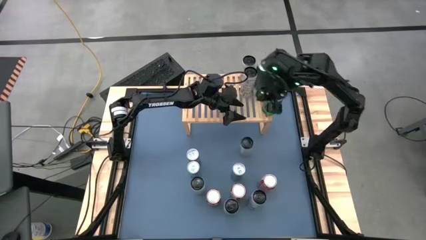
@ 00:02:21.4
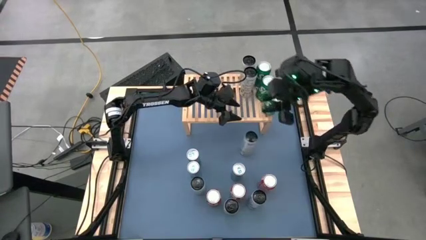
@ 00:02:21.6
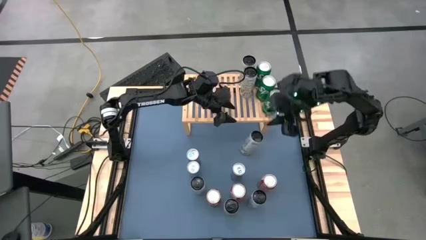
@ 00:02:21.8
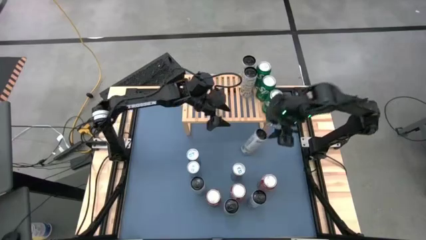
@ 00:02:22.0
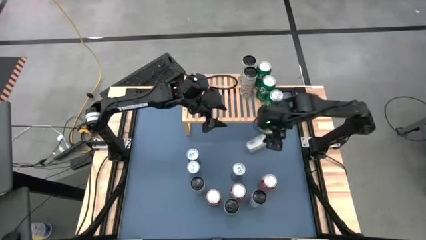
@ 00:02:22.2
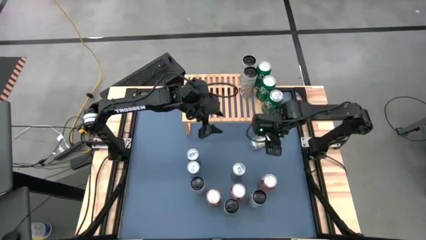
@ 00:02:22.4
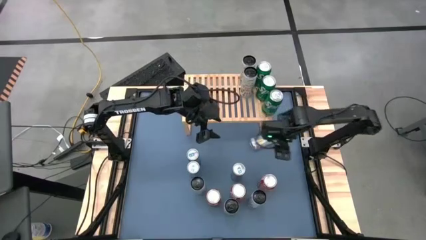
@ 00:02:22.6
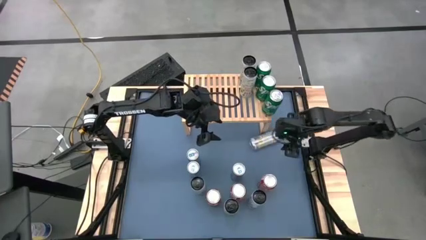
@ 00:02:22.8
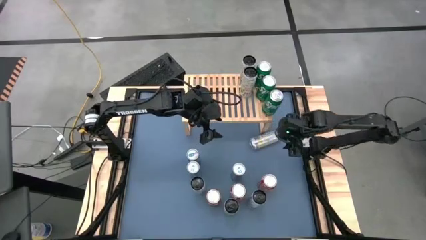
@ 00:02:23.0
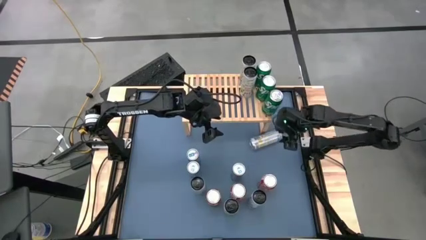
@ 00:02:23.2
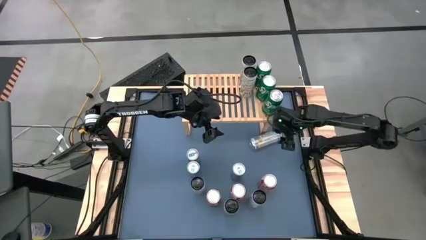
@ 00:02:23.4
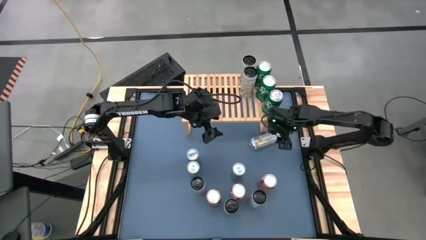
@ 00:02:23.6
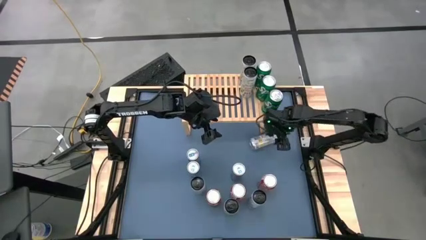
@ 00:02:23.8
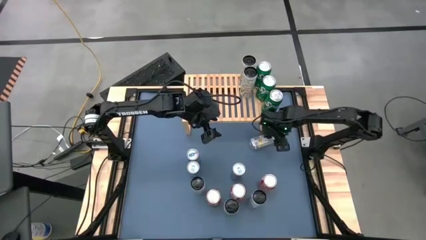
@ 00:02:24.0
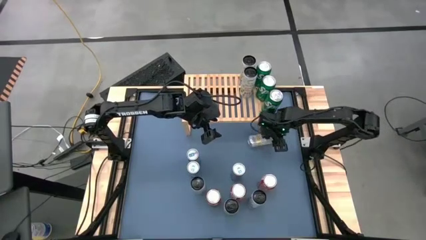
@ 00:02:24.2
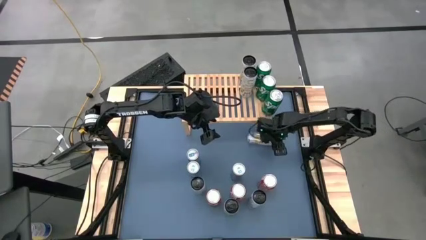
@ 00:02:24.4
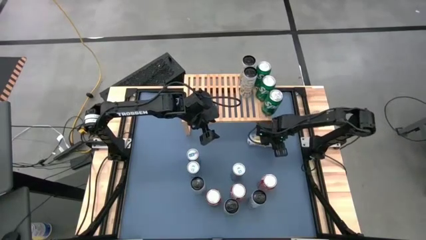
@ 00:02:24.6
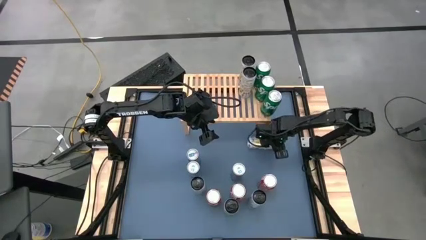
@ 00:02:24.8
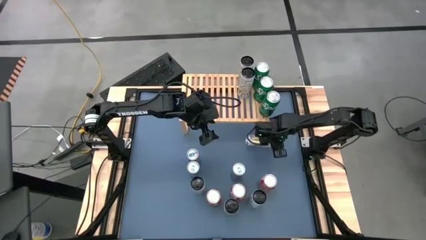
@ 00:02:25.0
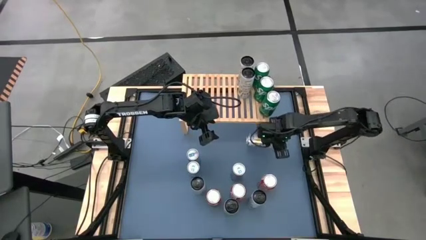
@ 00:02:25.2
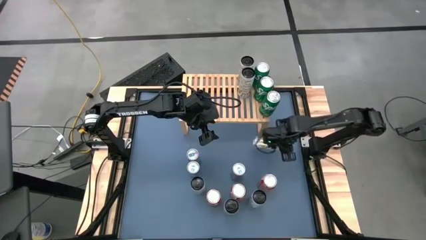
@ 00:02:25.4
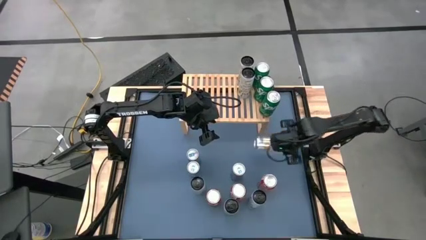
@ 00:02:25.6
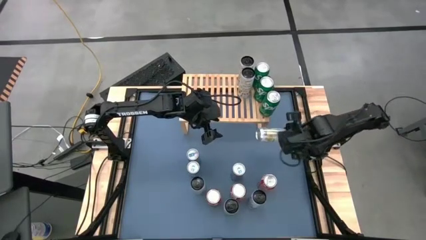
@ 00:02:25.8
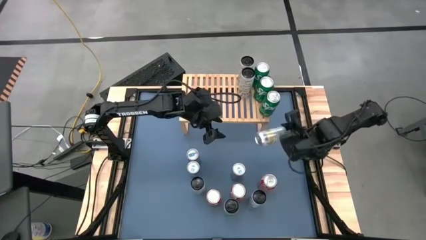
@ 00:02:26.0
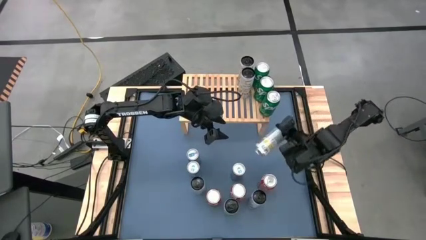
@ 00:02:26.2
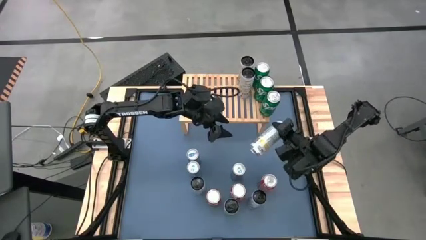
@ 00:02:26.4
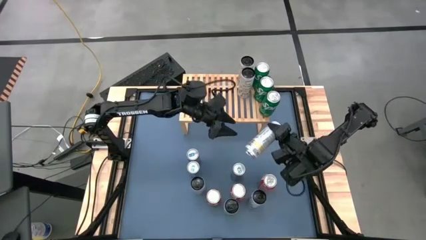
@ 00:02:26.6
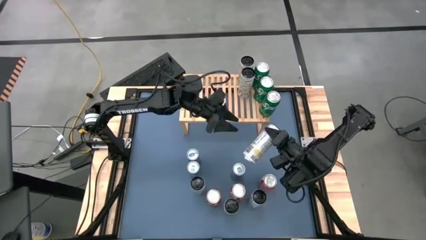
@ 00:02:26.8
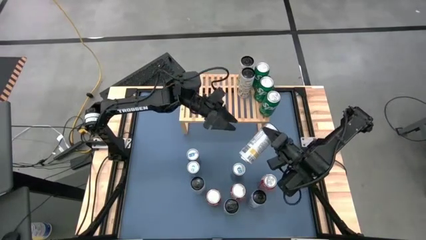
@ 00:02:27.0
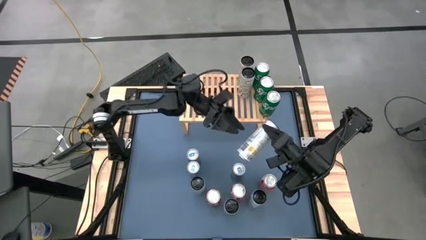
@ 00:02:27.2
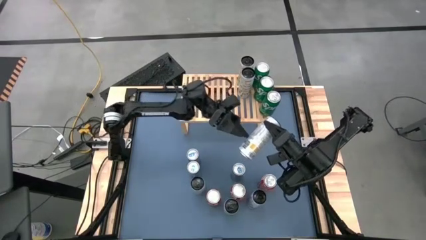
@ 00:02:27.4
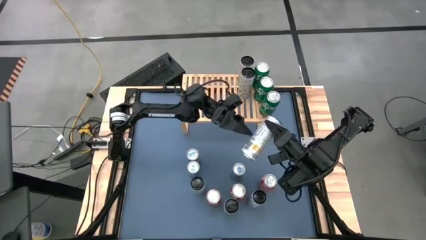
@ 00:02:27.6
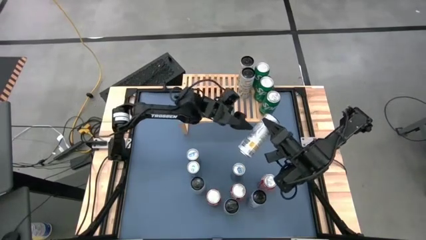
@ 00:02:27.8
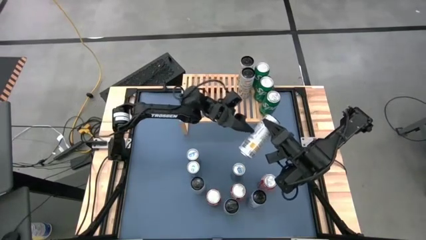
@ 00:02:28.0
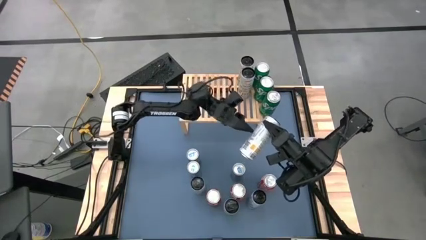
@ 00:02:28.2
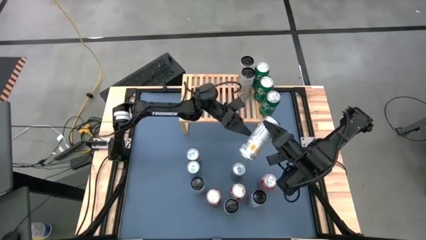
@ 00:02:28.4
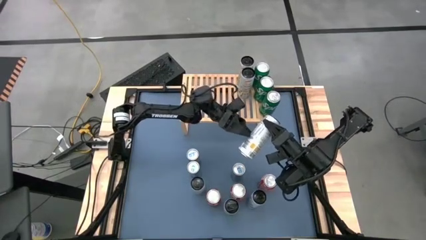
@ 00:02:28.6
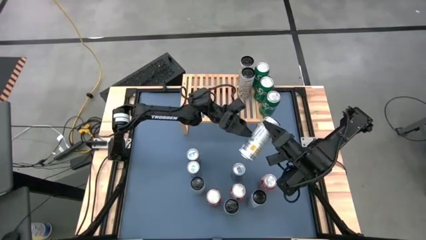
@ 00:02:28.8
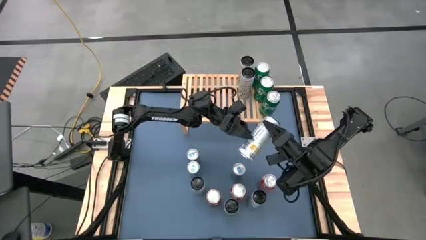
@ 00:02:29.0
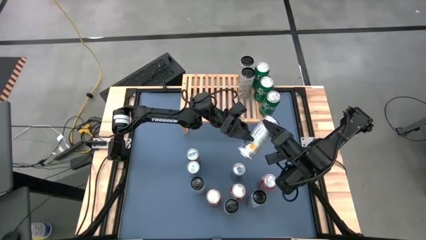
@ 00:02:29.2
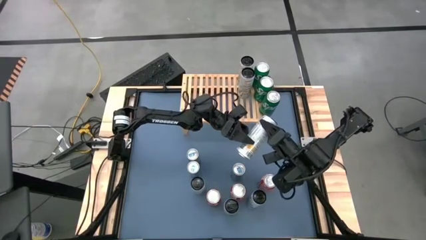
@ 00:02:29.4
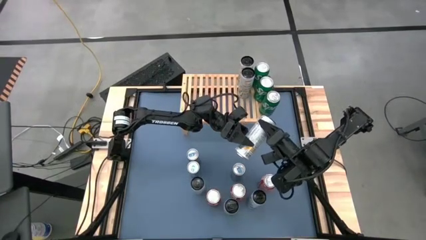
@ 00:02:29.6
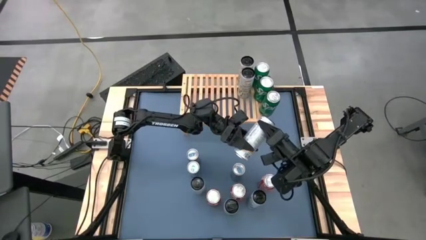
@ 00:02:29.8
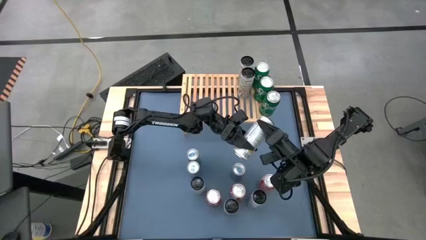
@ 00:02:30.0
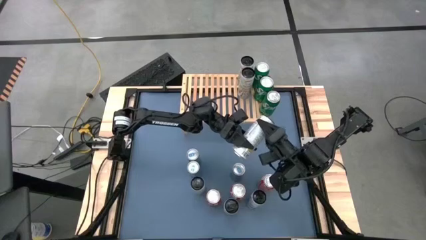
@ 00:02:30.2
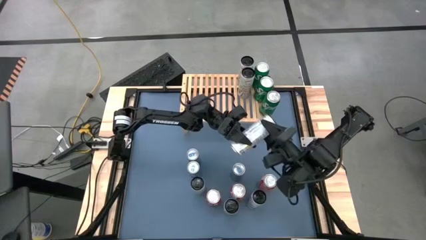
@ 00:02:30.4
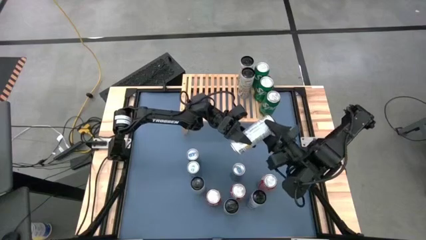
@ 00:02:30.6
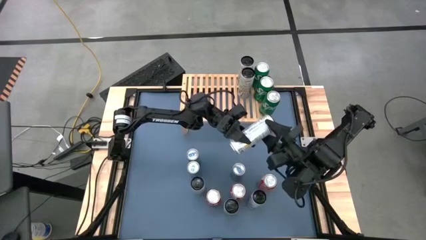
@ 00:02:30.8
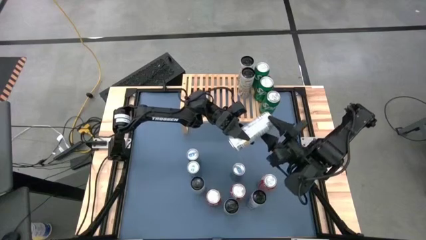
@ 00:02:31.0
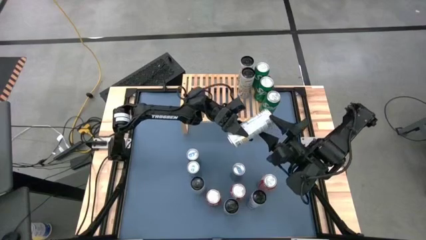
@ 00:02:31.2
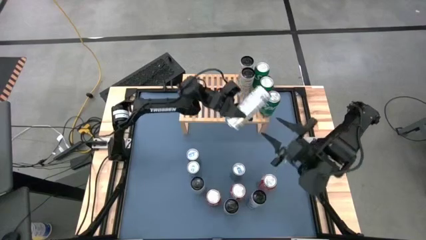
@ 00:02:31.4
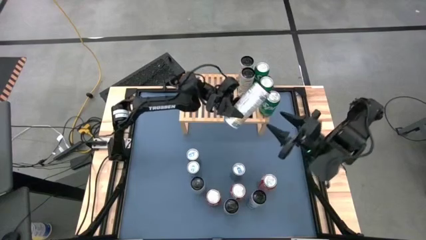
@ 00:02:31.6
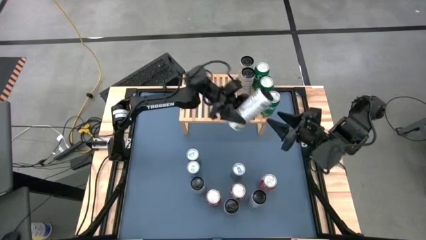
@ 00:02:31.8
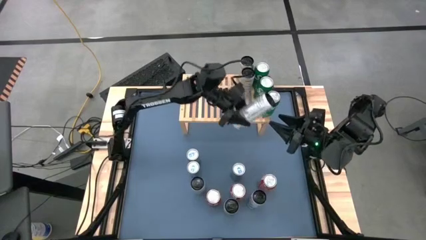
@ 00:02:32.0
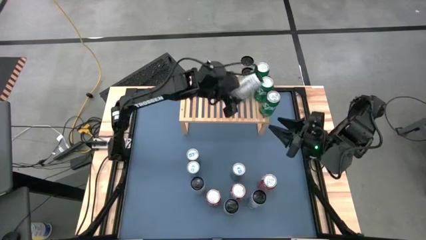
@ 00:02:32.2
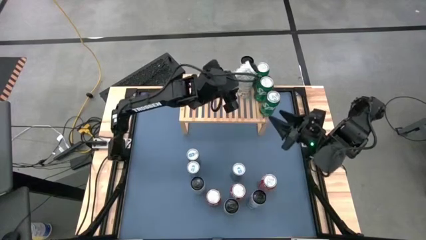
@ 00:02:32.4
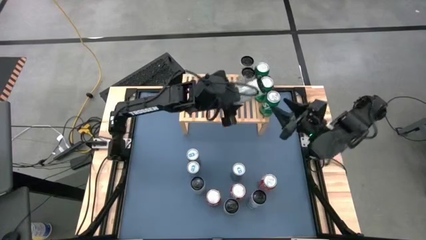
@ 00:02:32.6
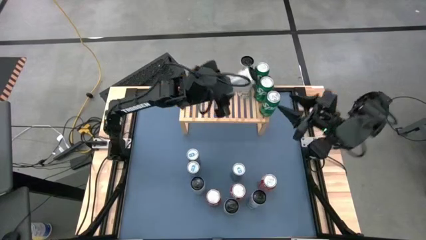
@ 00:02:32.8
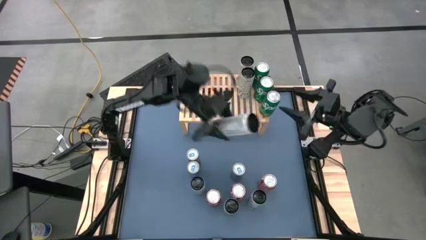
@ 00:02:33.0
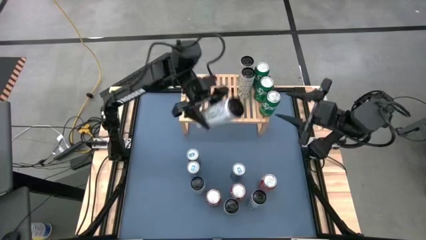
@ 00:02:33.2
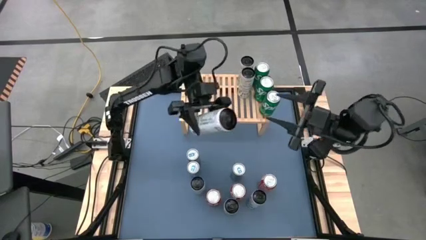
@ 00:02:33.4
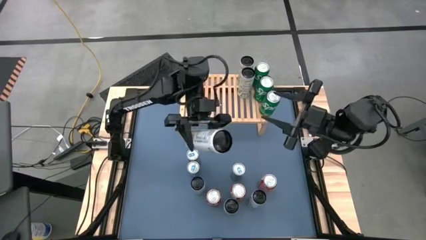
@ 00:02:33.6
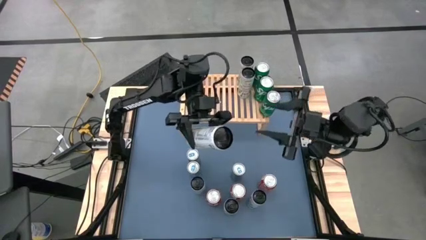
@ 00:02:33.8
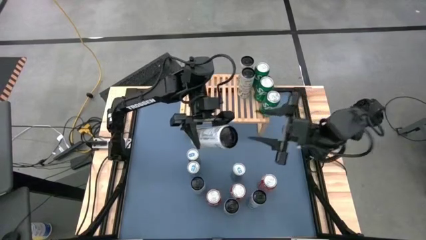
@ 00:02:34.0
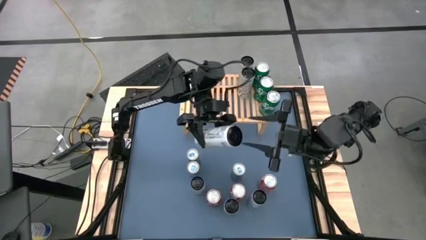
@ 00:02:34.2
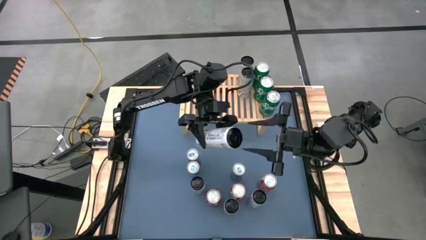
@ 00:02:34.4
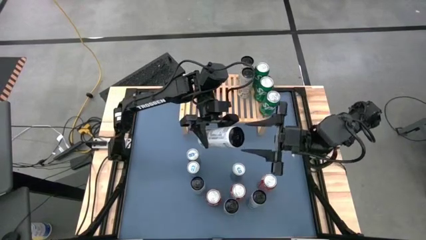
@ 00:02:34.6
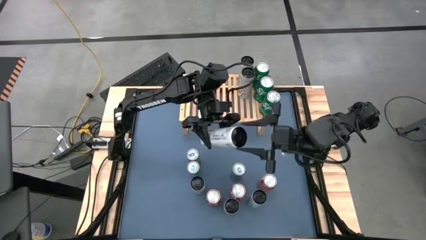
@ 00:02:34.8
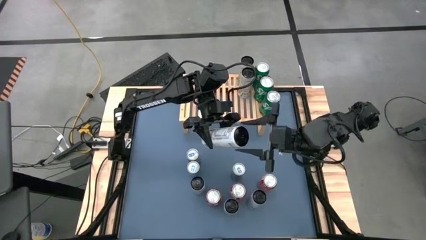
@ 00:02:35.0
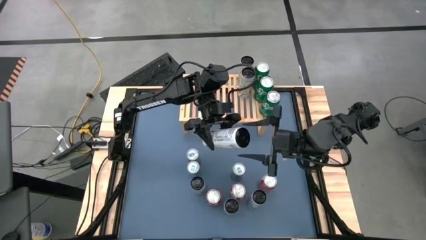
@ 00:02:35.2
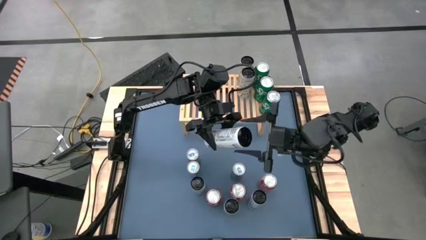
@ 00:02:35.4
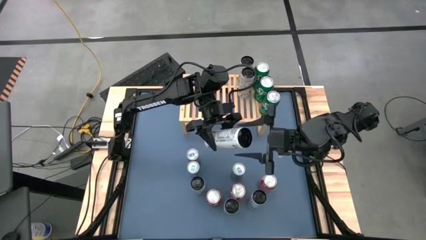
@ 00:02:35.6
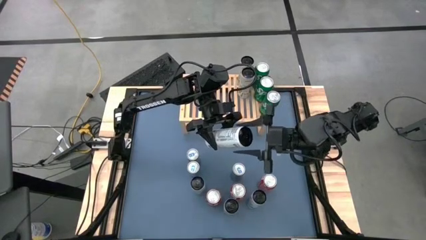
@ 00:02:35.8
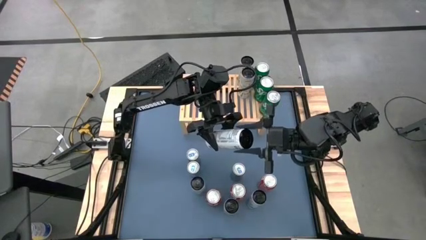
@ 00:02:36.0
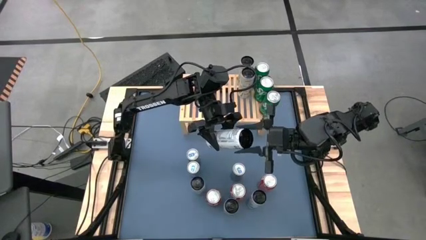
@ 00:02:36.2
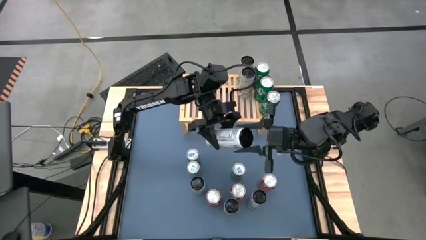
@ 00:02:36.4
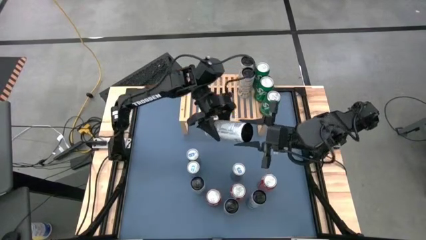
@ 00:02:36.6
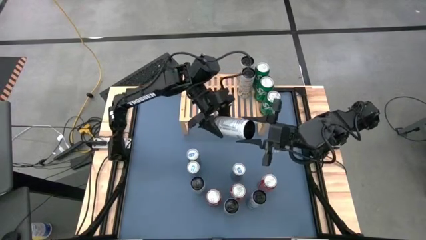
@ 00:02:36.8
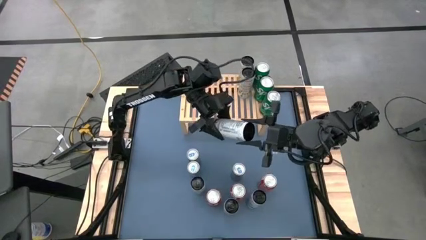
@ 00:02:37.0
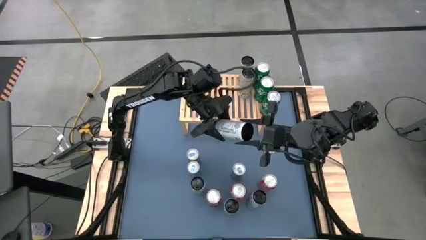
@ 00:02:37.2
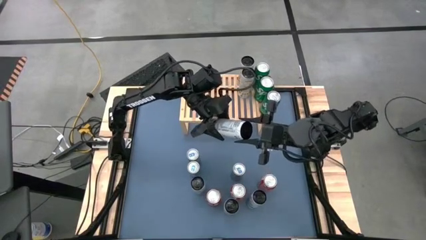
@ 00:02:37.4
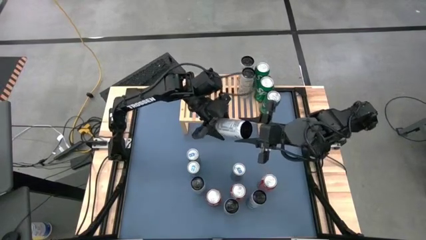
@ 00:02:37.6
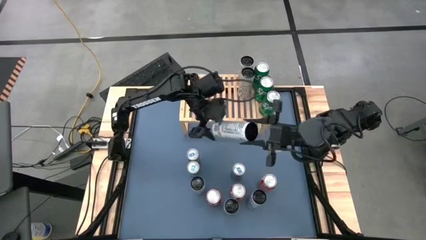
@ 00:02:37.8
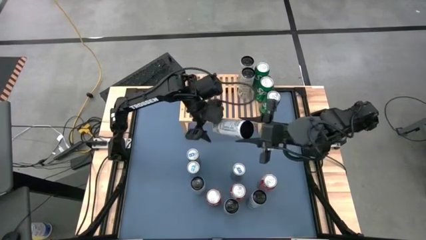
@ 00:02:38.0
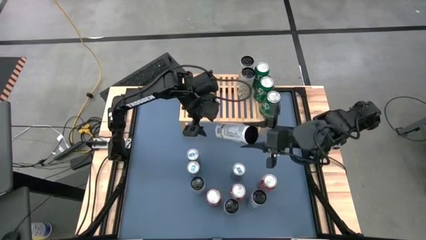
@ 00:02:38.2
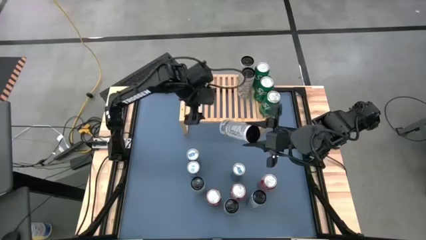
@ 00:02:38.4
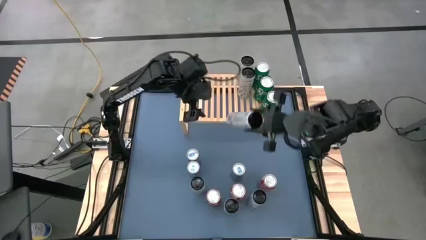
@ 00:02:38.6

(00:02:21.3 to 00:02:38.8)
Task: Place canned beverage on shelf
Put the white-yellow soda can on the shelf aligned with the other white-yellow soda can
